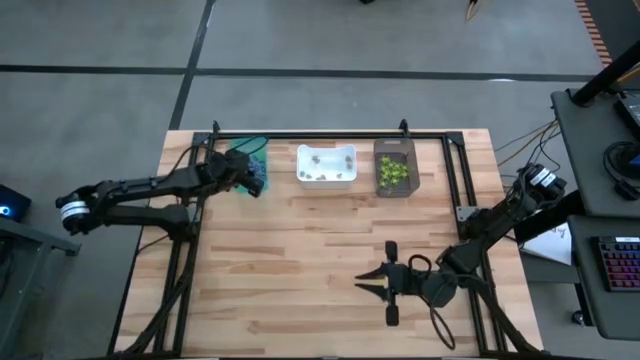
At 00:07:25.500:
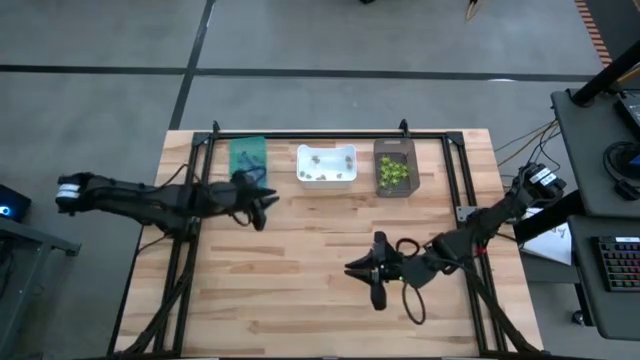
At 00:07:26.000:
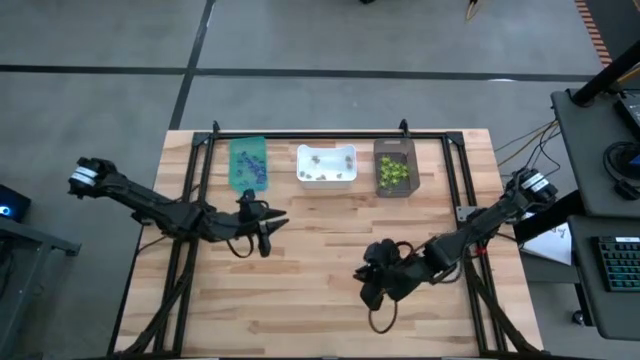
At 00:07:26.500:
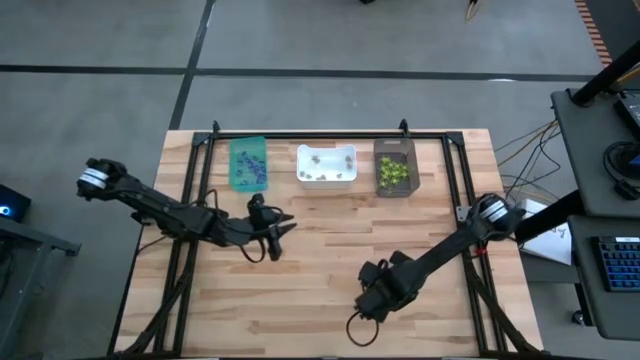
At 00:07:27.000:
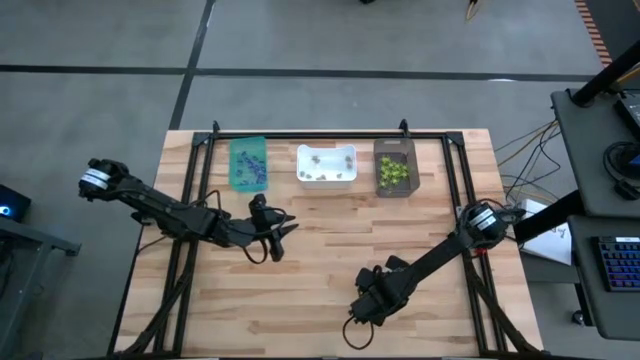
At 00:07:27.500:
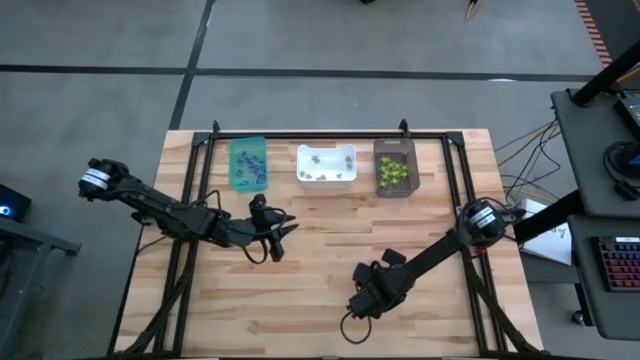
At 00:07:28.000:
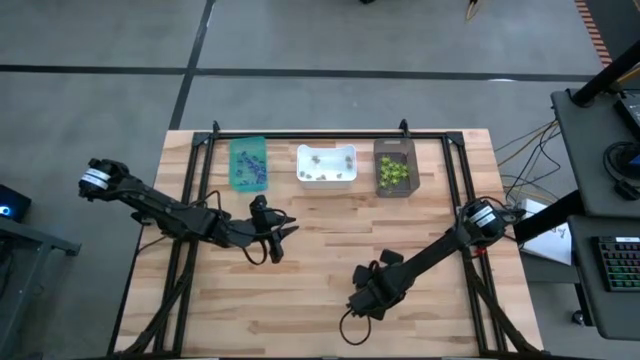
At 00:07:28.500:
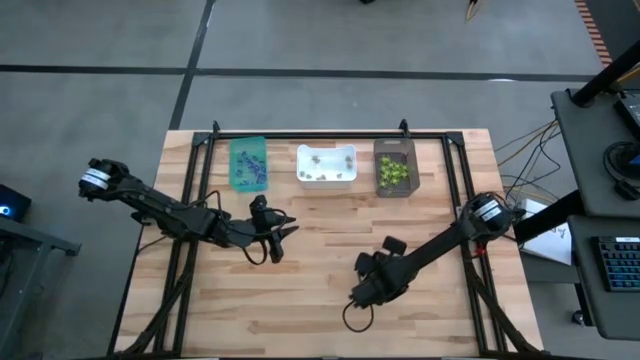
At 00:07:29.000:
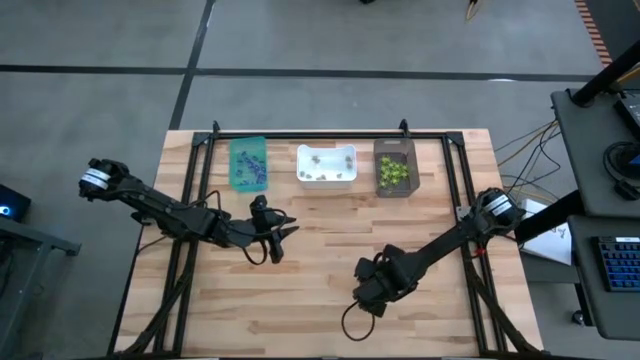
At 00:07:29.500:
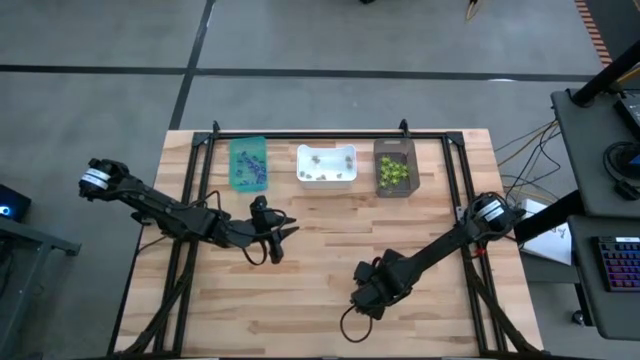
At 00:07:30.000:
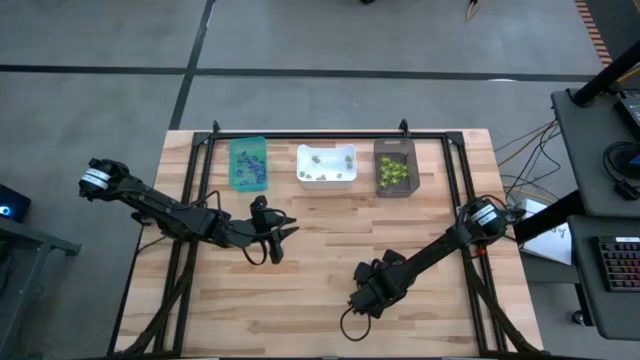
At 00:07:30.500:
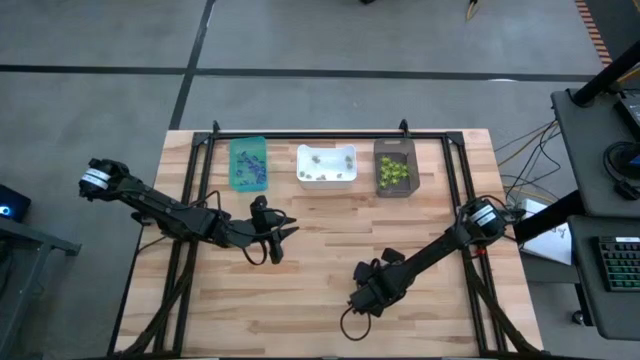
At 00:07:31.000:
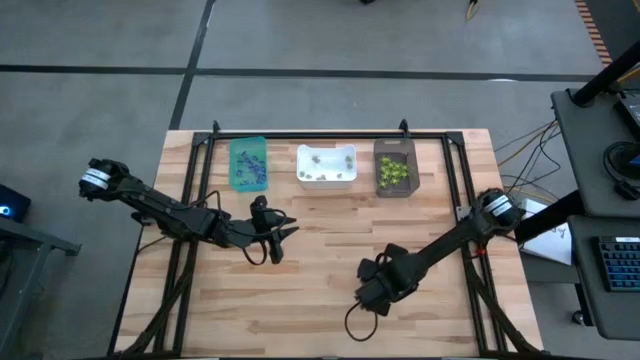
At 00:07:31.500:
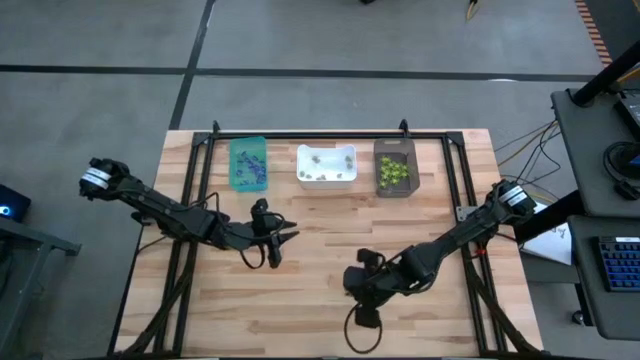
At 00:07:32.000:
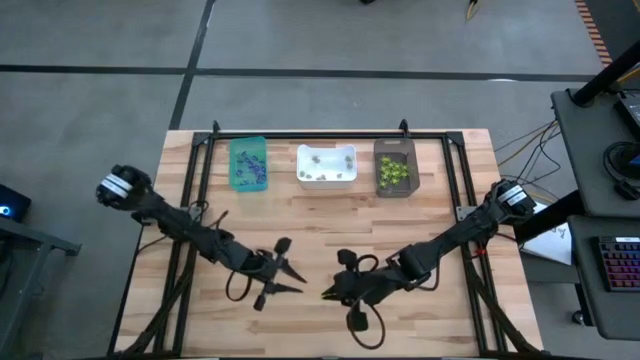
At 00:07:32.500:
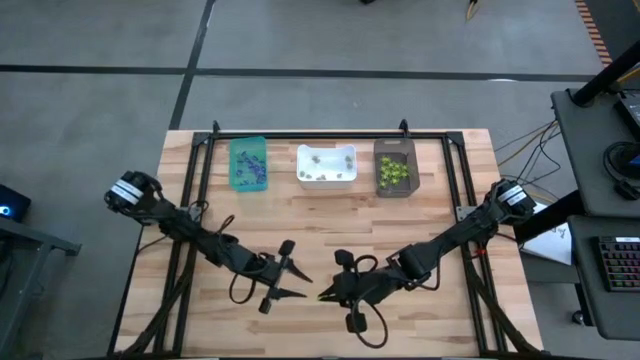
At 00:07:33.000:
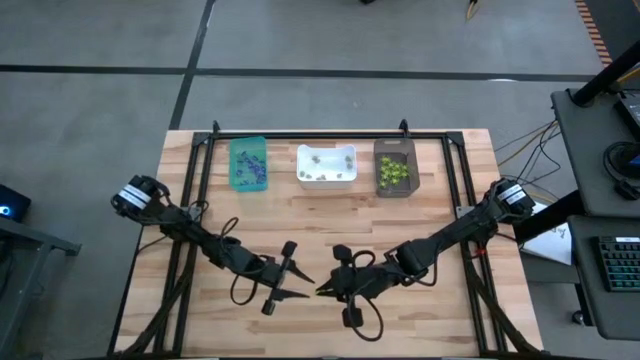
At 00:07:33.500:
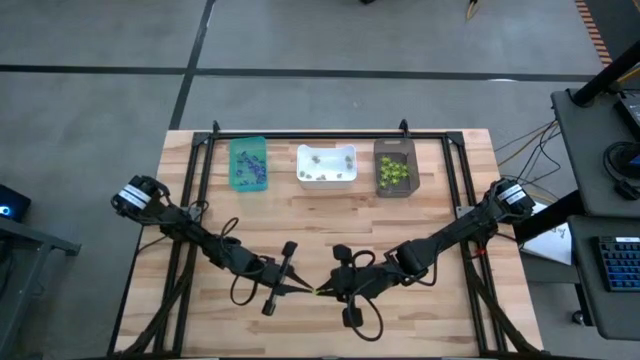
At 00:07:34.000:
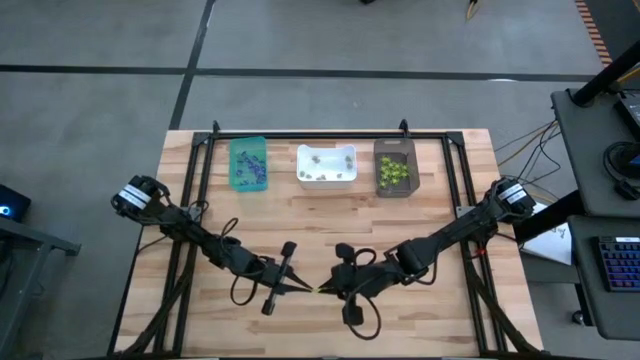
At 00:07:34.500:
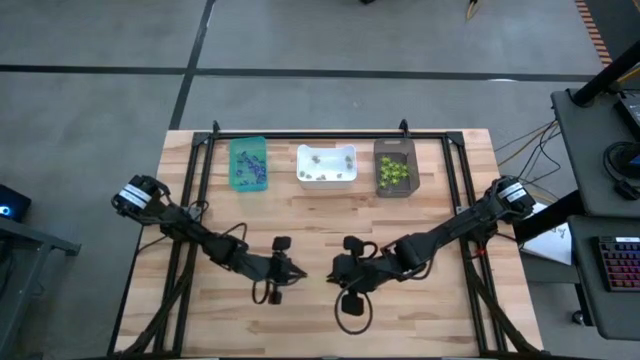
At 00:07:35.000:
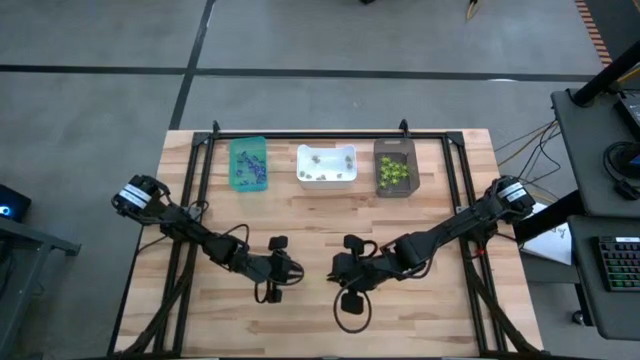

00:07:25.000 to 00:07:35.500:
Task: Sort Halloween decoration
Put the green spider toy into the black bin

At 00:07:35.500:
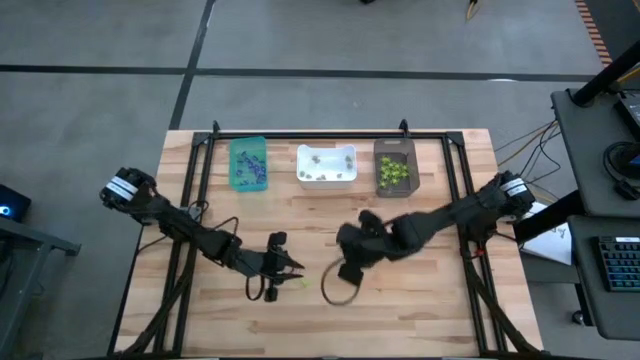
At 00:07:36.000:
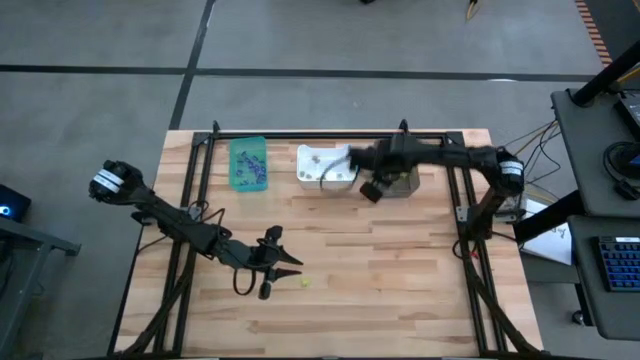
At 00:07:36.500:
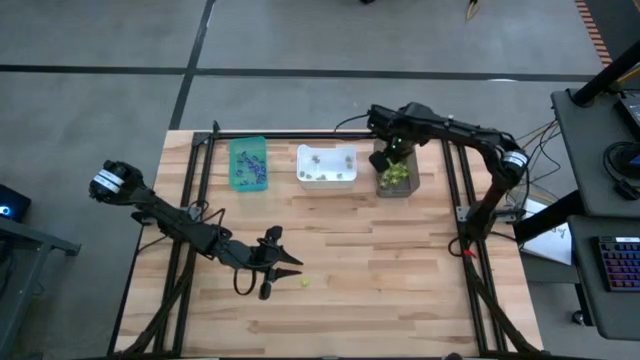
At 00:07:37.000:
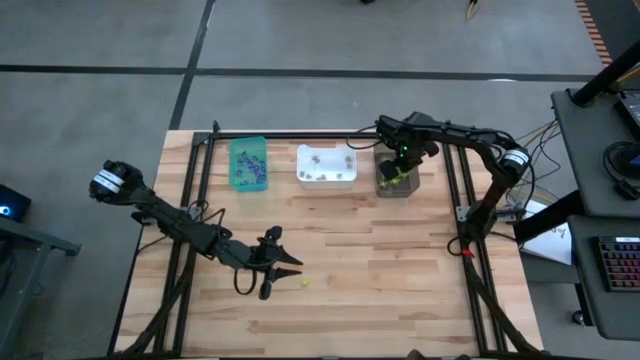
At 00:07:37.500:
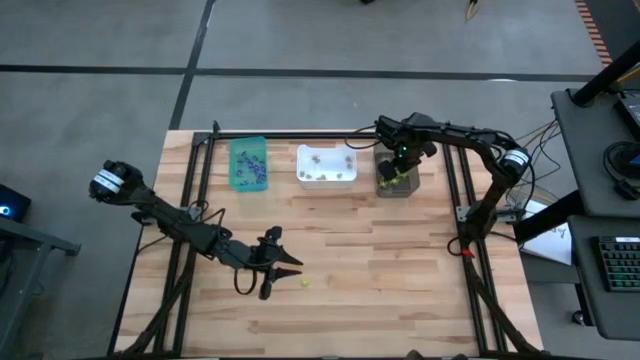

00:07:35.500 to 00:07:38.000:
Put the green spider toy into the black bin

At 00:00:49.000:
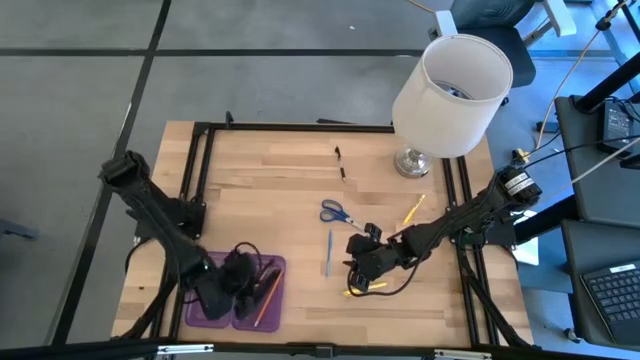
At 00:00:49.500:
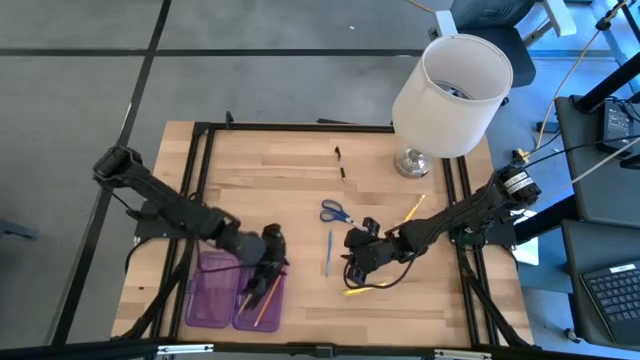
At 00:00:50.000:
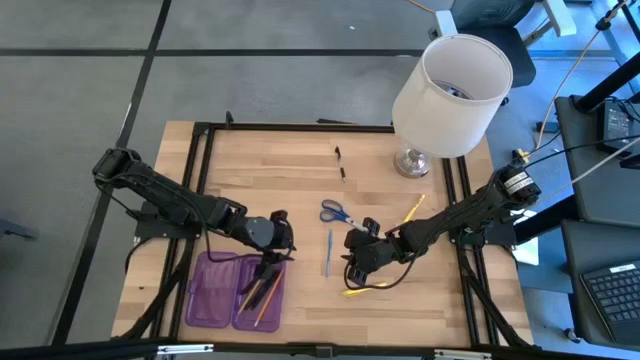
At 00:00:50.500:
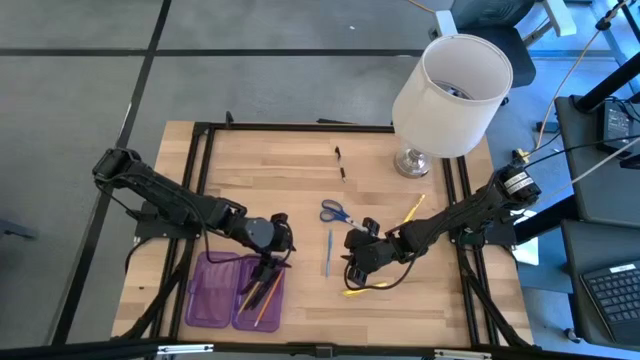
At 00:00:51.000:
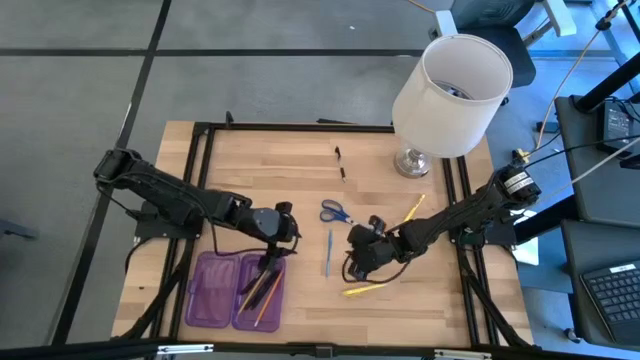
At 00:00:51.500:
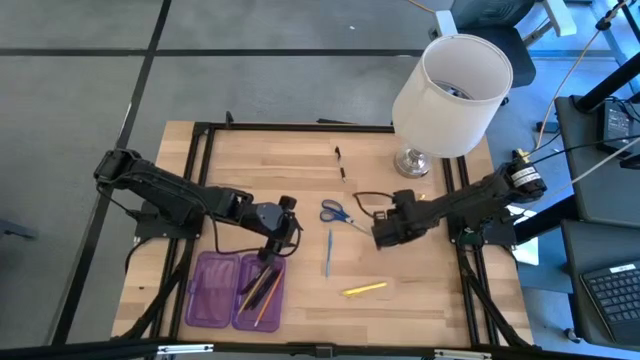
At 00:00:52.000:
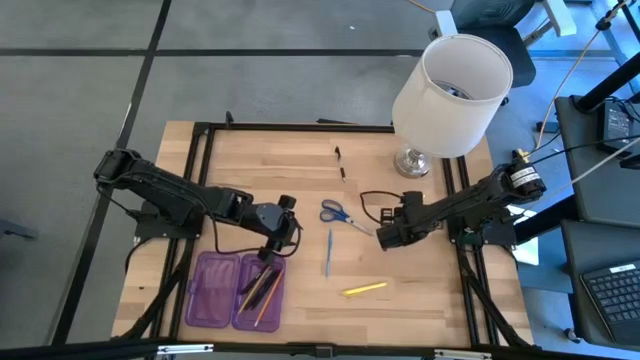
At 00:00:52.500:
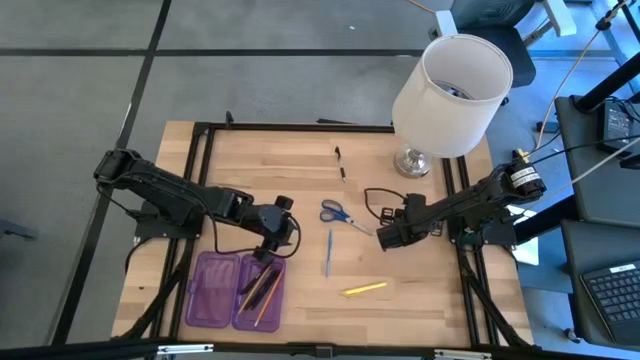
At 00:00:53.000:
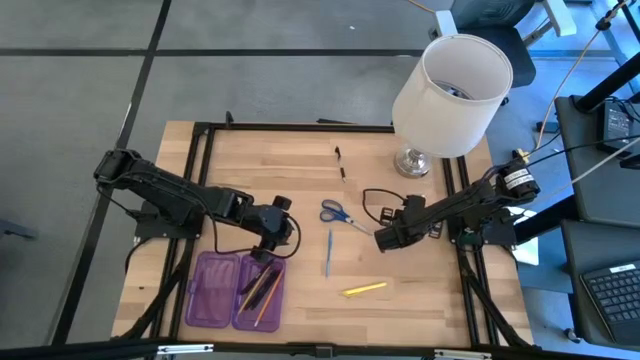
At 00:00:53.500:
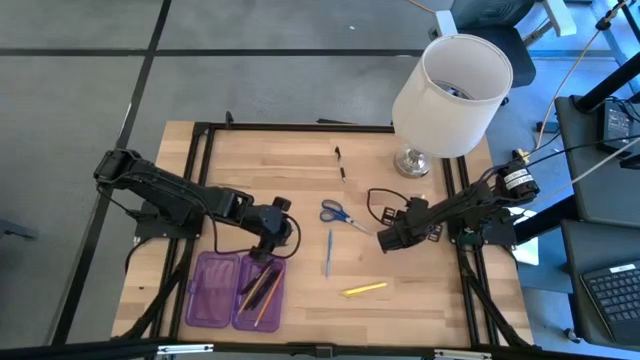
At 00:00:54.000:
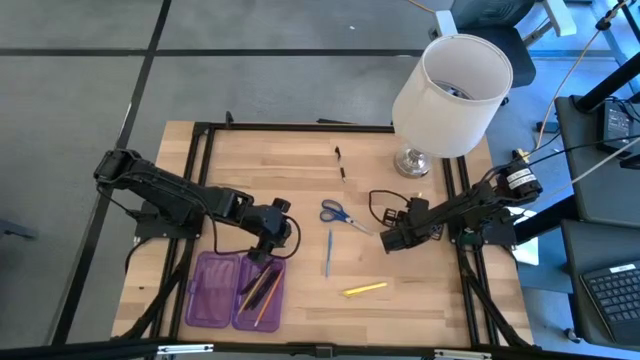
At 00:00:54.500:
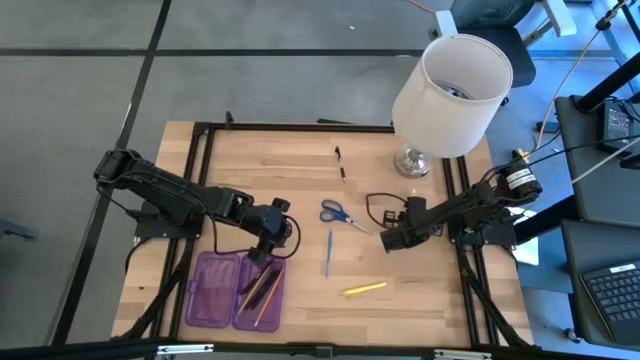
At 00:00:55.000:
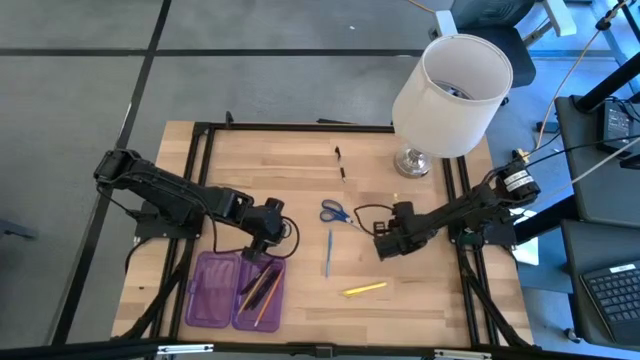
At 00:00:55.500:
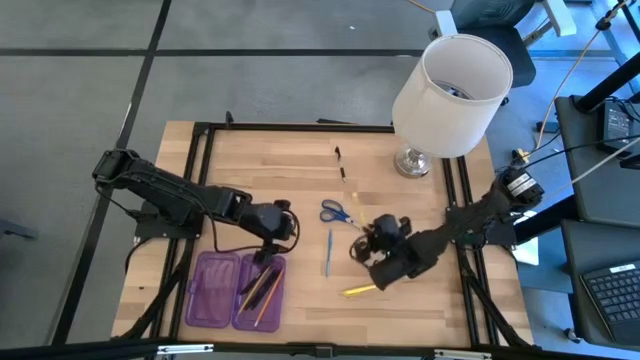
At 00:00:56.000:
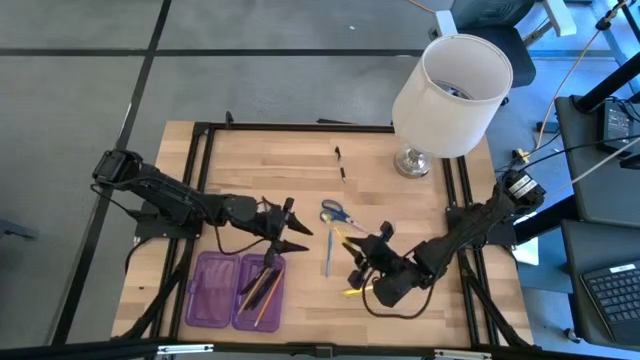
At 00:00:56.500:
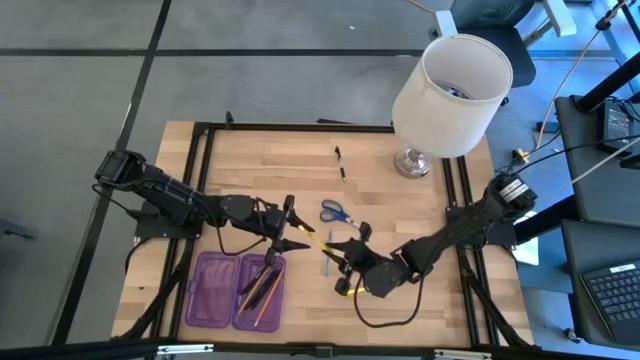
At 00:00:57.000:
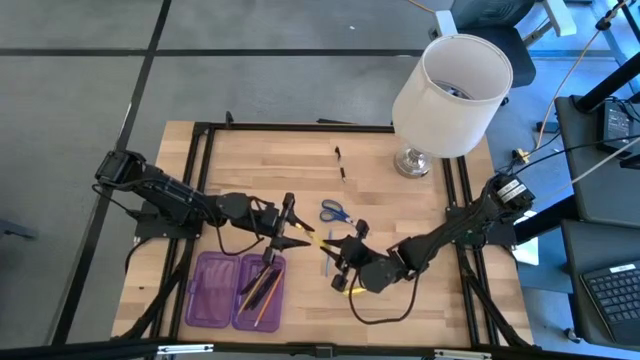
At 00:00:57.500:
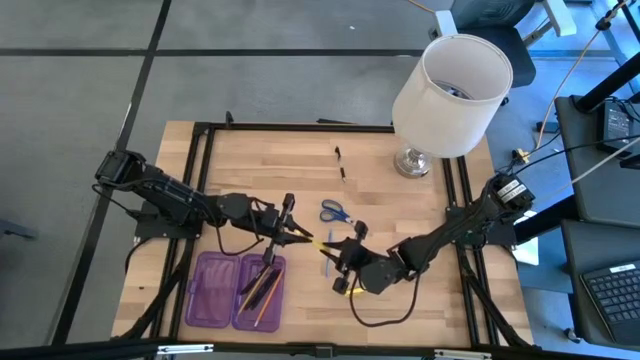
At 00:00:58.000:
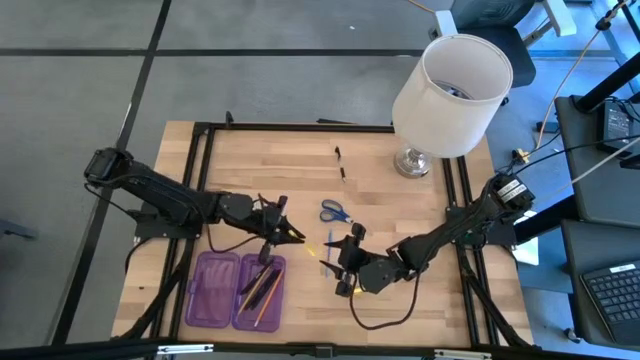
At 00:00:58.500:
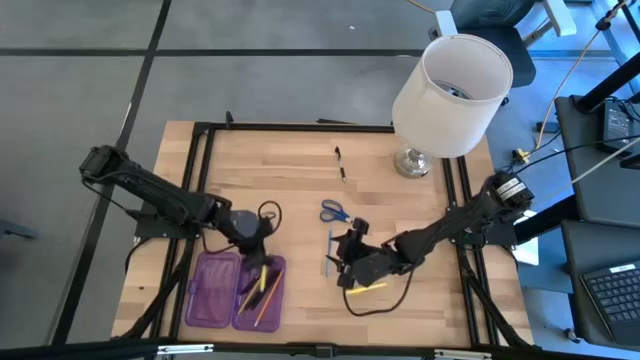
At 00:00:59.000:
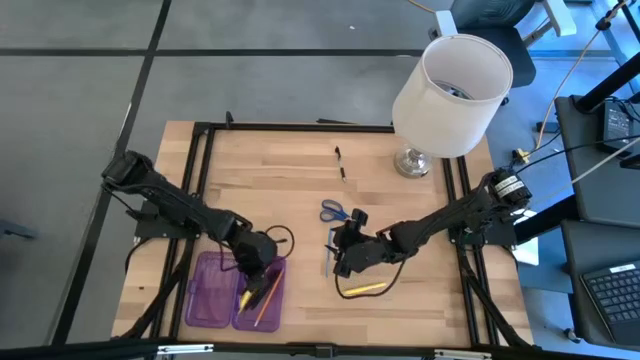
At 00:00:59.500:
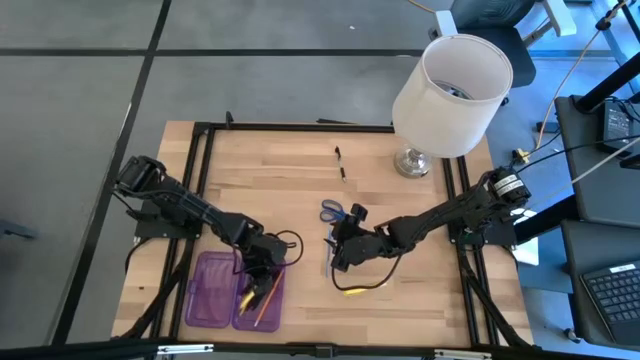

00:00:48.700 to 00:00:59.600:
Task: Pick & place school supplies into a supply box
Put the top yellow pen into the violet box
